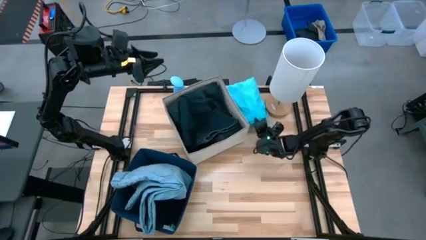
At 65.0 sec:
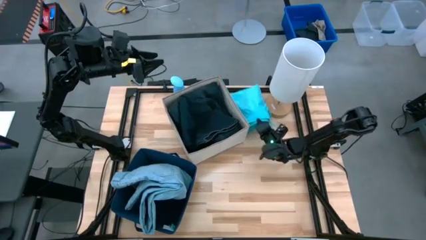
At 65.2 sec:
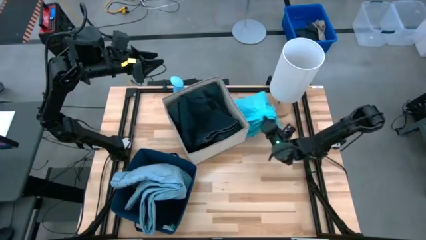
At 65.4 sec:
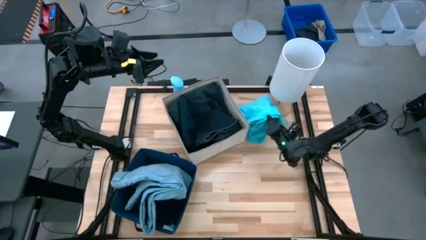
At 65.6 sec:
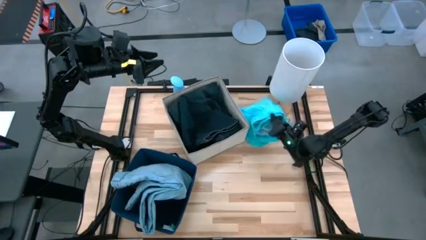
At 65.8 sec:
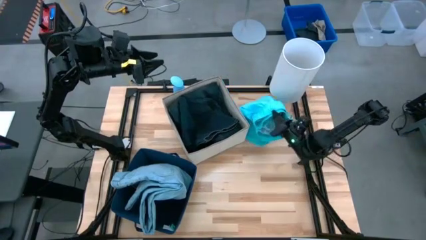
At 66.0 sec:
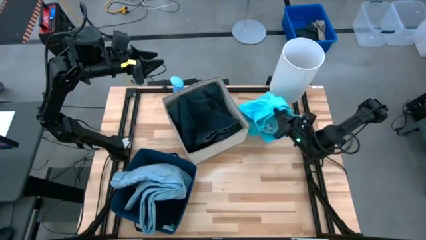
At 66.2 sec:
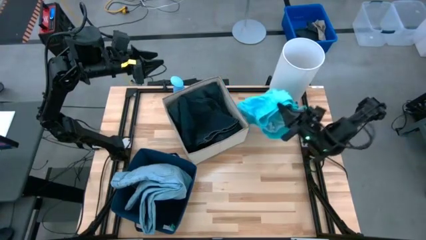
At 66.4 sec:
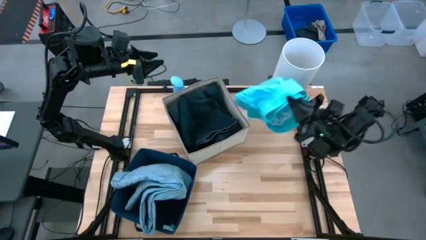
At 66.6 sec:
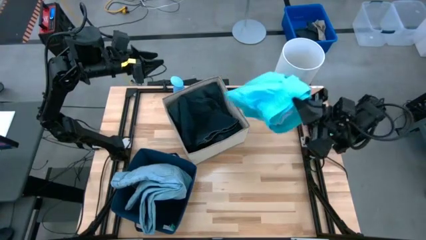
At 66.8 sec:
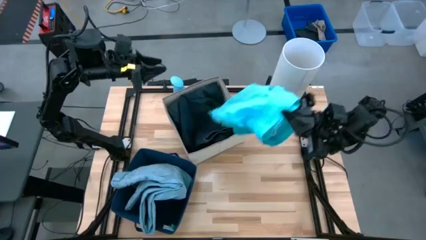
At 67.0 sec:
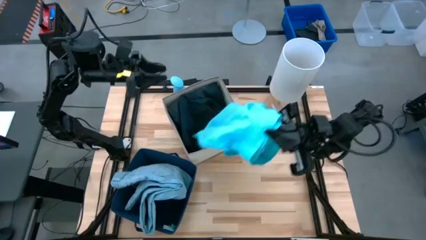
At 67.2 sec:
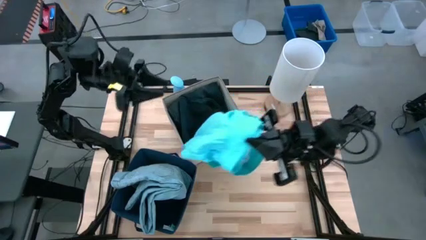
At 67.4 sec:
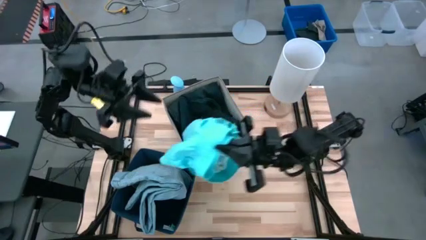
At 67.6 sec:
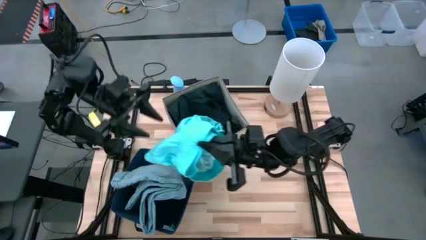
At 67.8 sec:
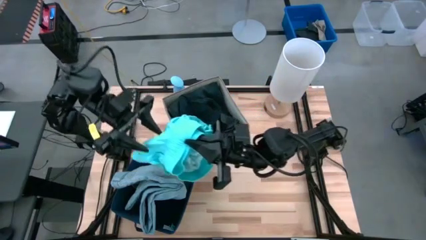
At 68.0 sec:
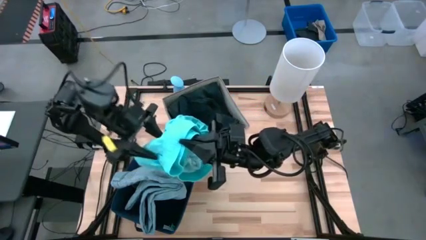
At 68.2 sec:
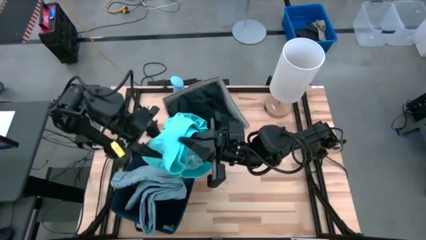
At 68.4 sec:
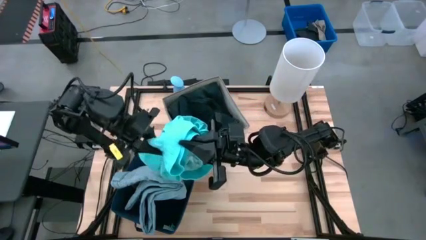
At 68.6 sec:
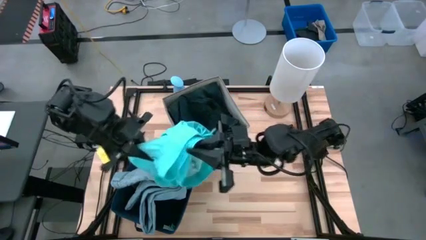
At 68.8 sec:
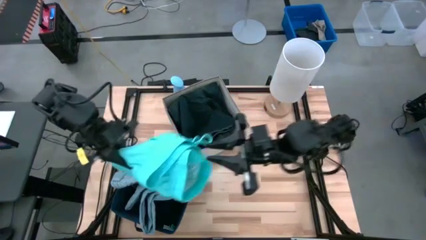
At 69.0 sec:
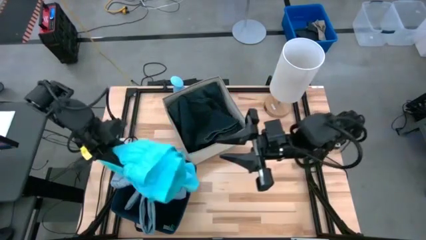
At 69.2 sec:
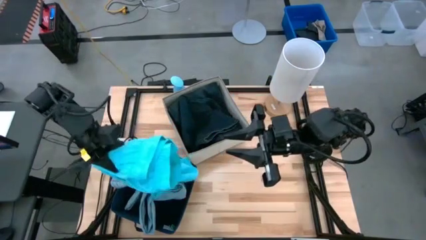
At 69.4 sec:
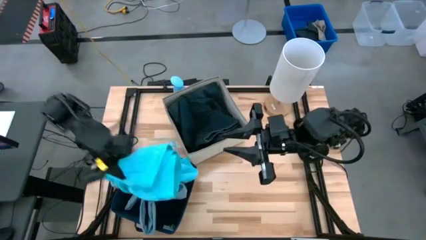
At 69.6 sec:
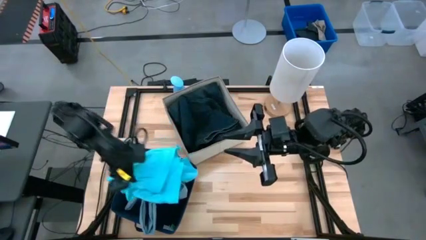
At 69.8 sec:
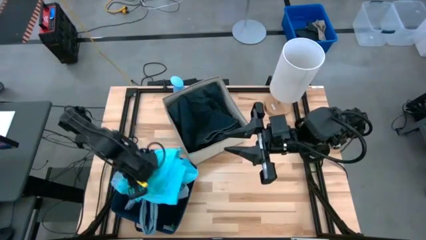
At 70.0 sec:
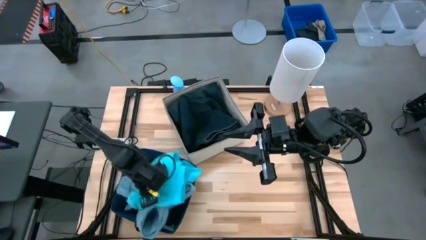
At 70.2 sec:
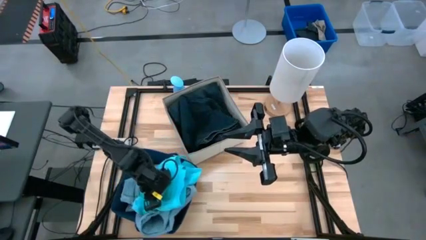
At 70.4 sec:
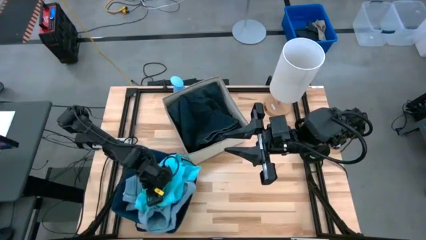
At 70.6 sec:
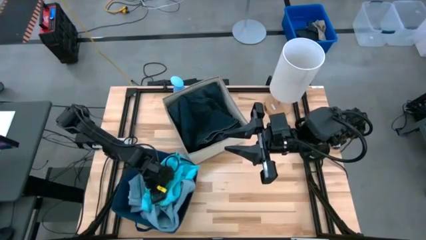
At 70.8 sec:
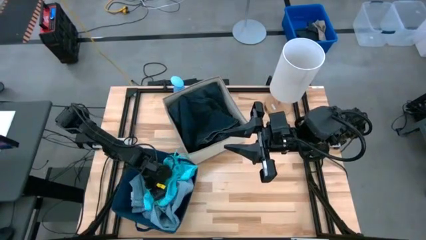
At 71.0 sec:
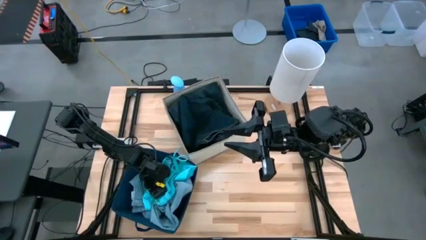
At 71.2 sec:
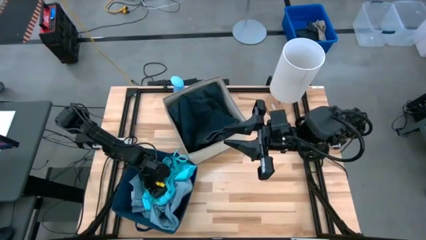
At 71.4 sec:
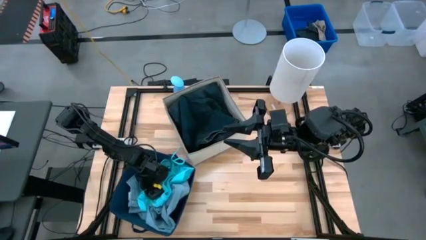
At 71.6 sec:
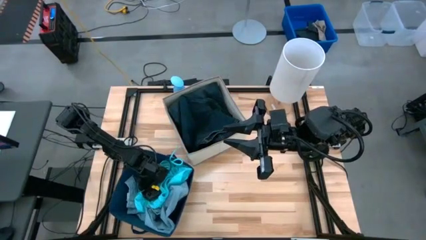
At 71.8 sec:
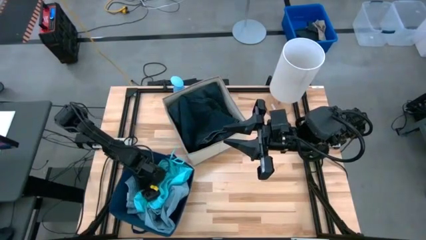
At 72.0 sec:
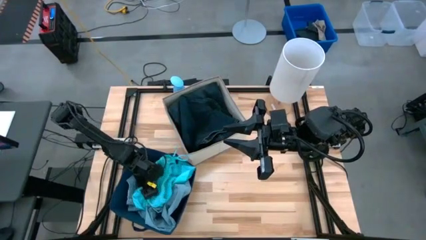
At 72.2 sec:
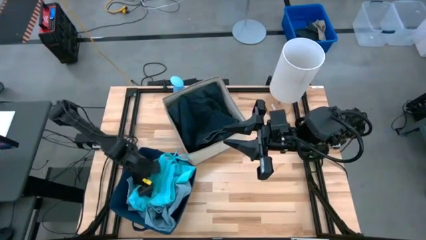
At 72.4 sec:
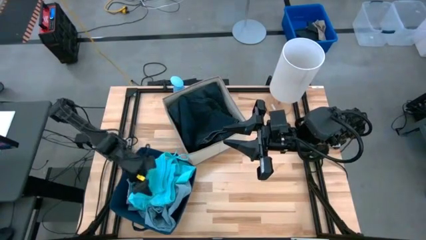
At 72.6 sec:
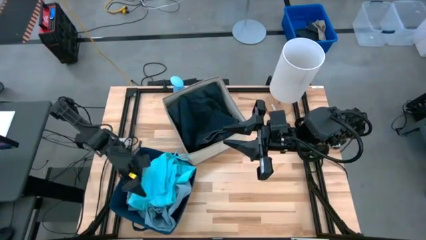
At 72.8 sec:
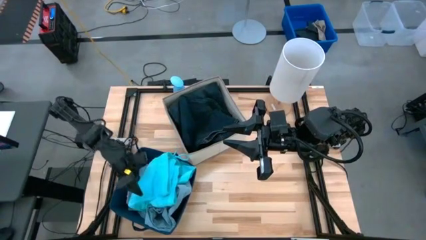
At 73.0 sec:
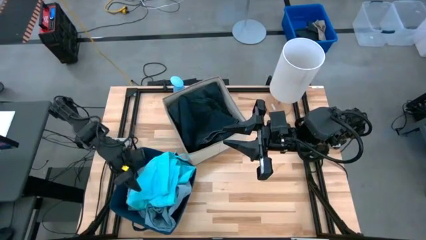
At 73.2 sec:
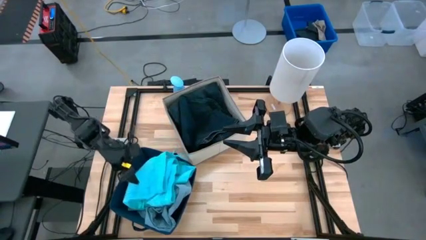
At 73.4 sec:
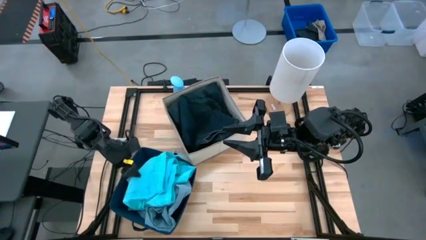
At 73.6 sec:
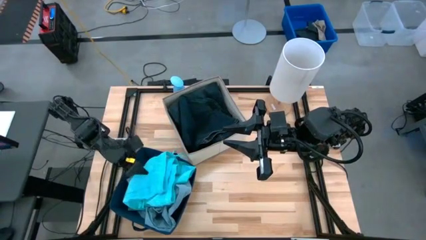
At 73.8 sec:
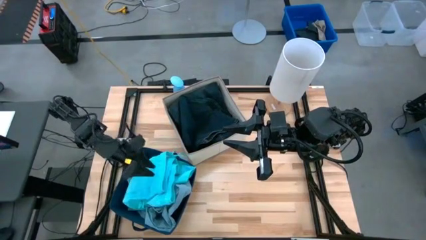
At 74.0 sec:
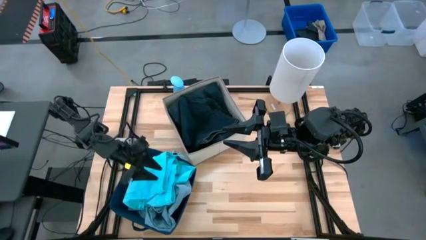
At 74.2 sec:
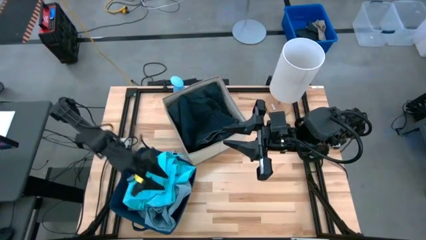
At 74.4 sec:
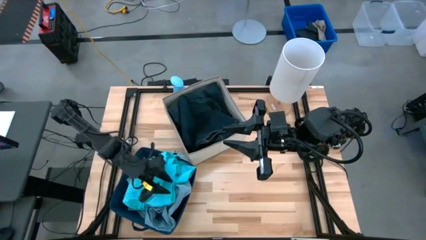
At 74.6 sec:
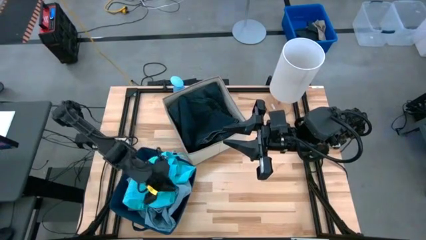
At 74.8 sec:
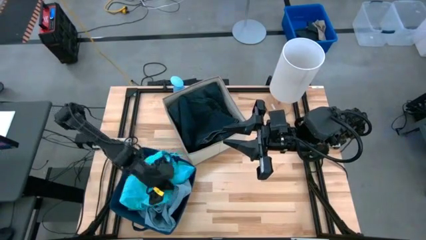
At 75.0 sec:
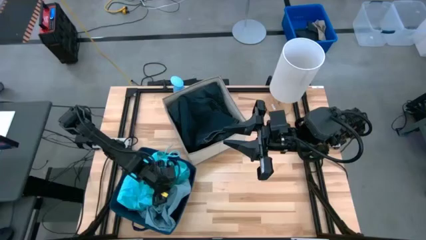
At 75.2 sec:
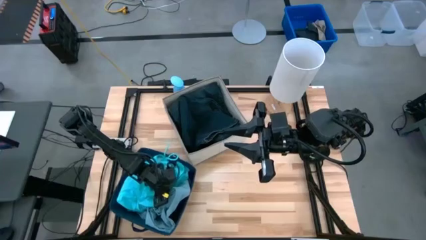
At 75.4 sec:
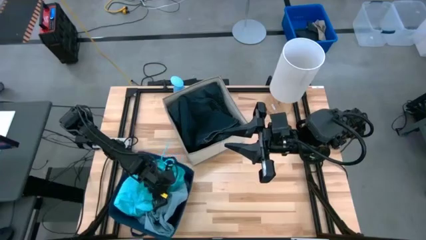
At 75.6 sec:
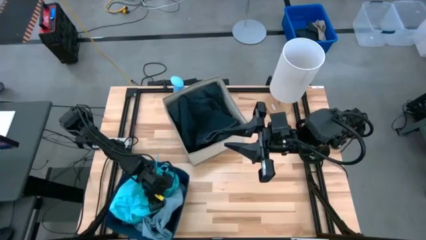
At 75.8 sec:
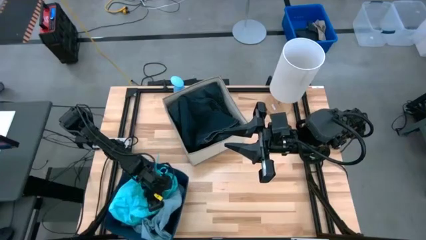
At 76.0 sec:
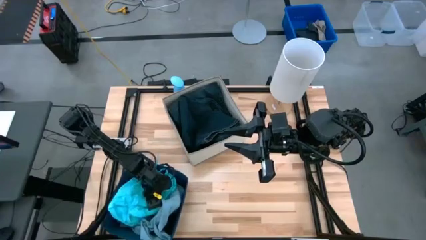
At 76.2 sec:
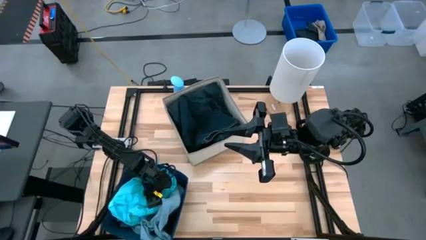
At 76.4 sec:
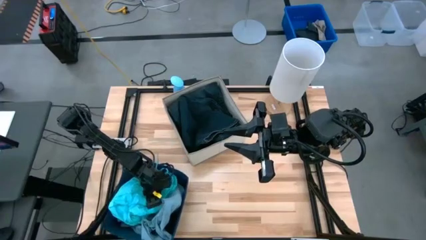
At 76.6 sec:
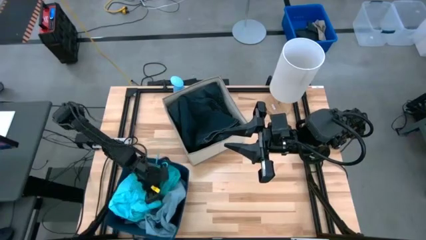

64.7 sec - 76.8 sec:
Task: Sort clothes
Put the light blue shorts into the blue-white laundry organizer
